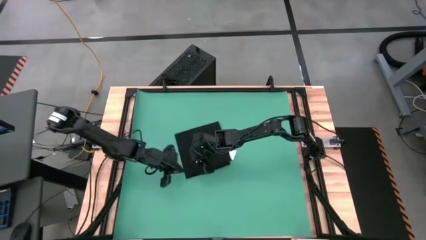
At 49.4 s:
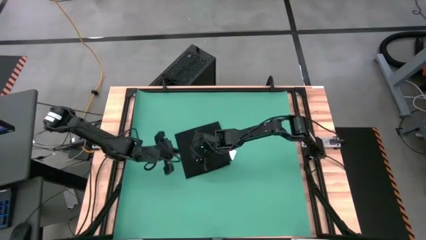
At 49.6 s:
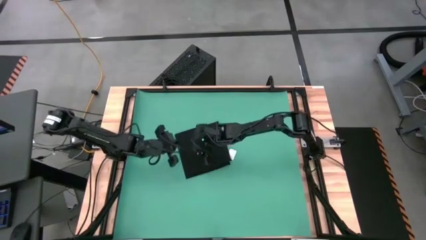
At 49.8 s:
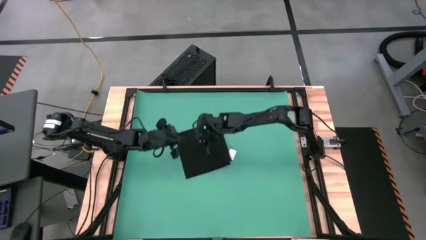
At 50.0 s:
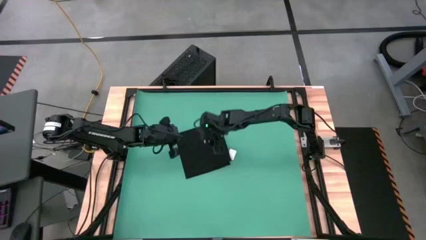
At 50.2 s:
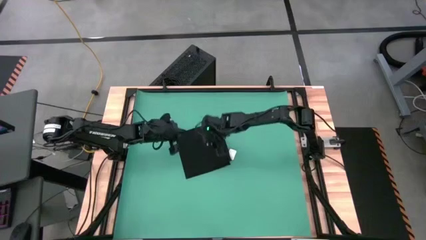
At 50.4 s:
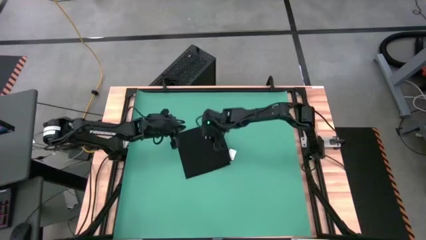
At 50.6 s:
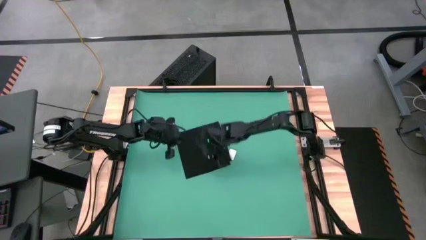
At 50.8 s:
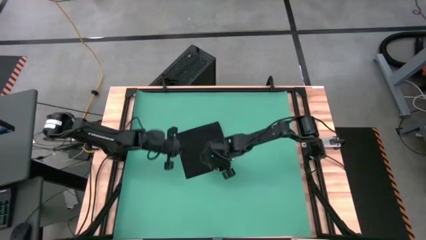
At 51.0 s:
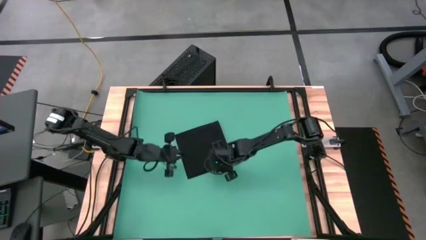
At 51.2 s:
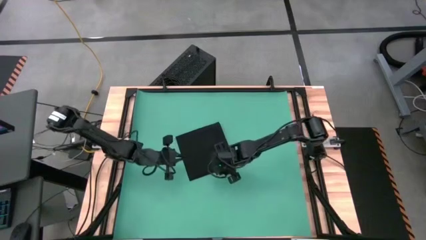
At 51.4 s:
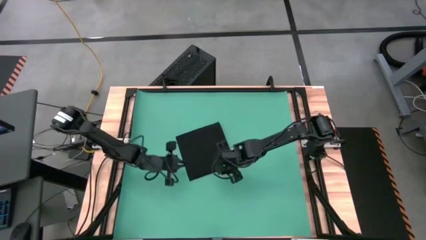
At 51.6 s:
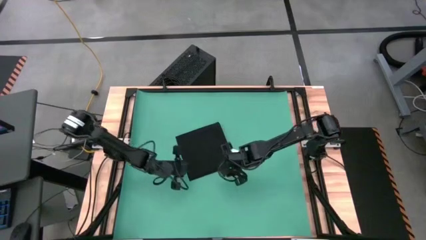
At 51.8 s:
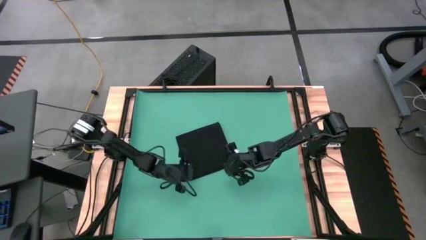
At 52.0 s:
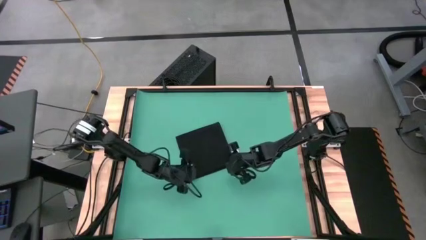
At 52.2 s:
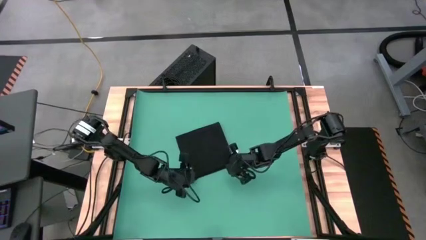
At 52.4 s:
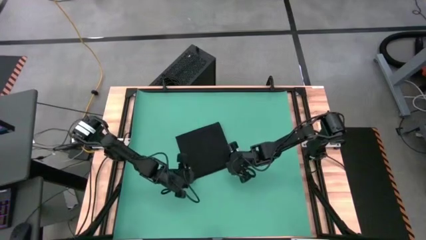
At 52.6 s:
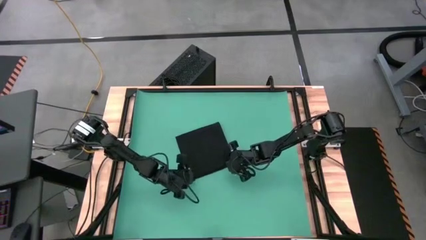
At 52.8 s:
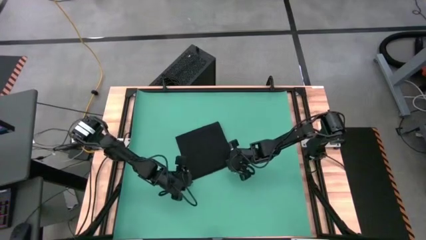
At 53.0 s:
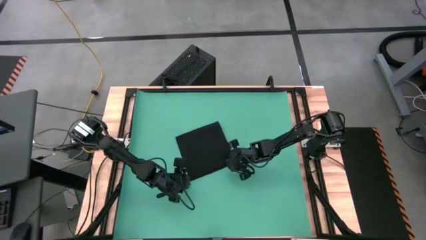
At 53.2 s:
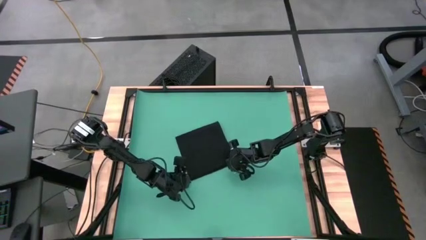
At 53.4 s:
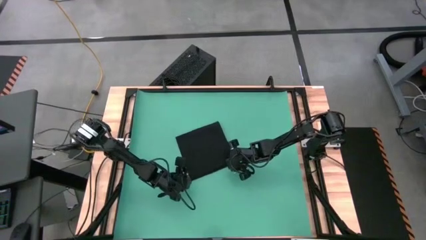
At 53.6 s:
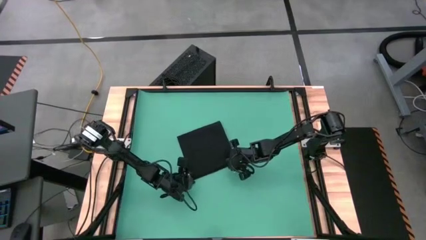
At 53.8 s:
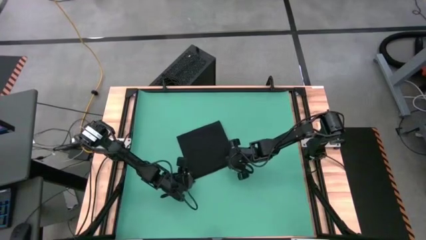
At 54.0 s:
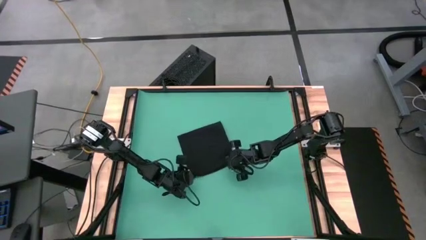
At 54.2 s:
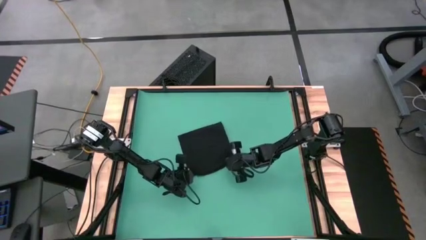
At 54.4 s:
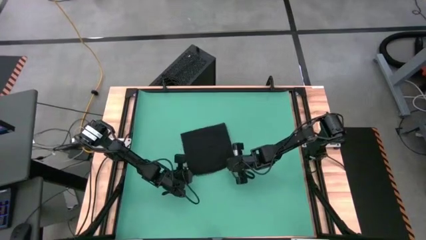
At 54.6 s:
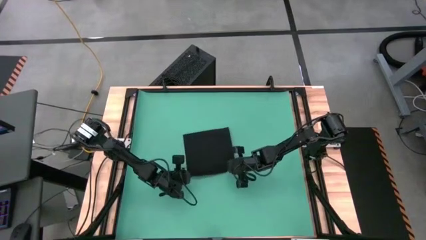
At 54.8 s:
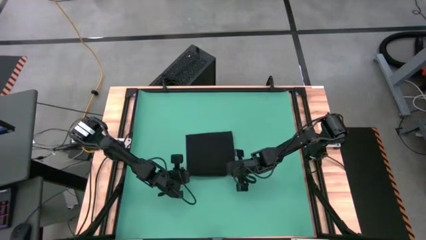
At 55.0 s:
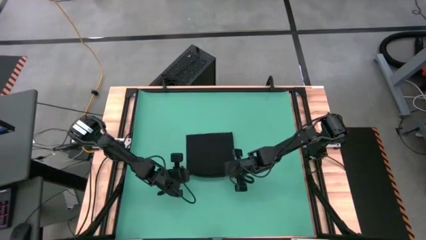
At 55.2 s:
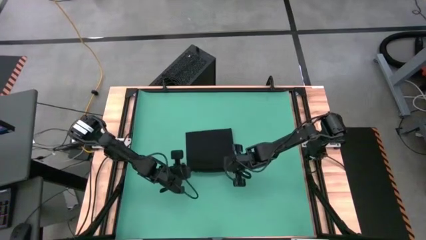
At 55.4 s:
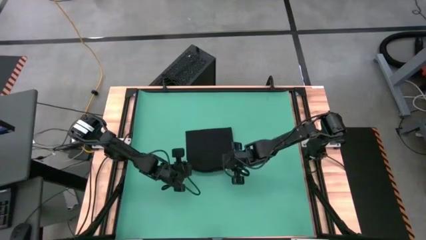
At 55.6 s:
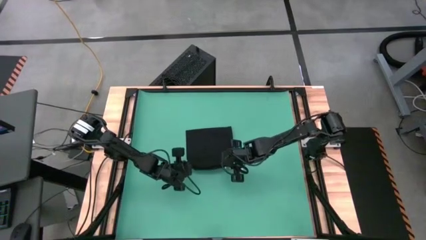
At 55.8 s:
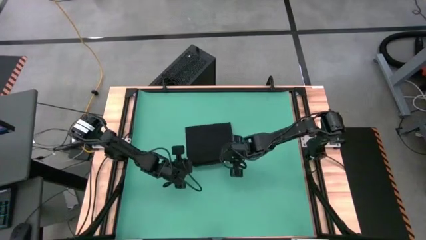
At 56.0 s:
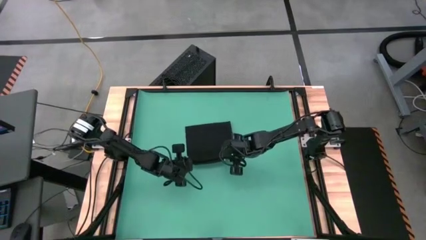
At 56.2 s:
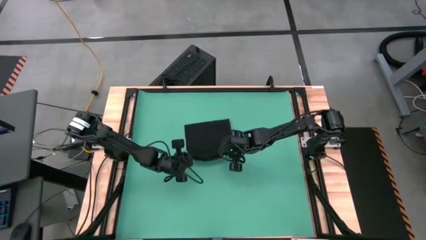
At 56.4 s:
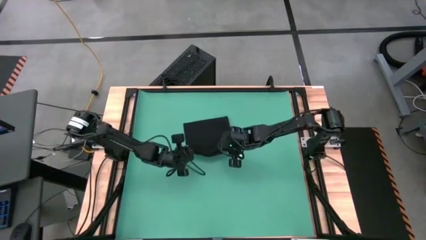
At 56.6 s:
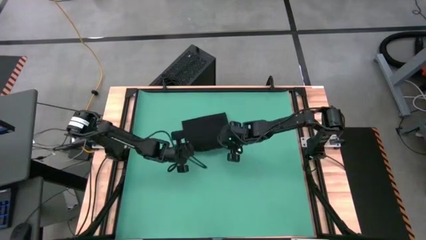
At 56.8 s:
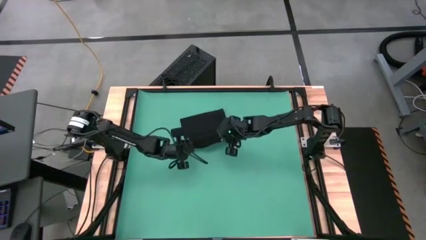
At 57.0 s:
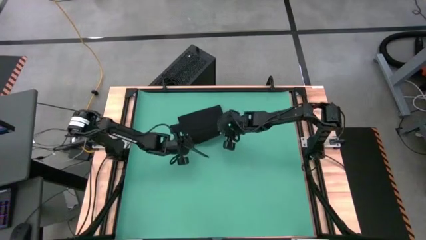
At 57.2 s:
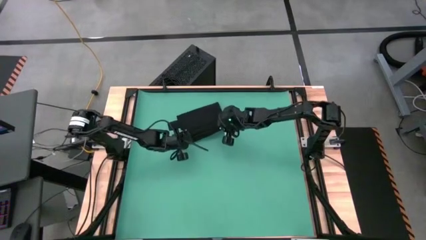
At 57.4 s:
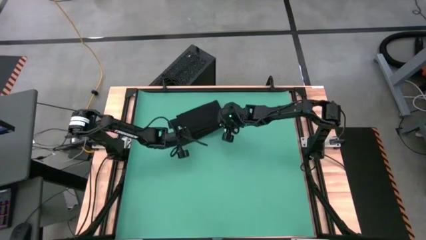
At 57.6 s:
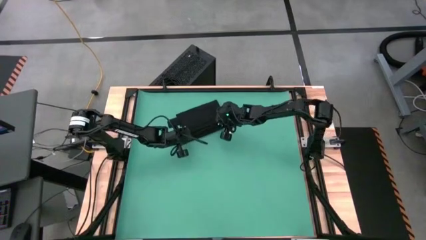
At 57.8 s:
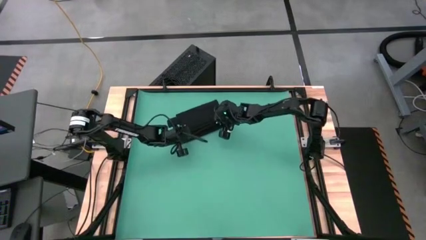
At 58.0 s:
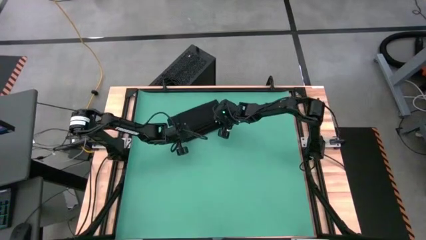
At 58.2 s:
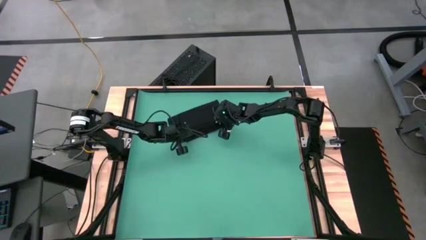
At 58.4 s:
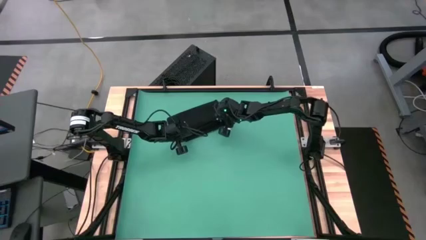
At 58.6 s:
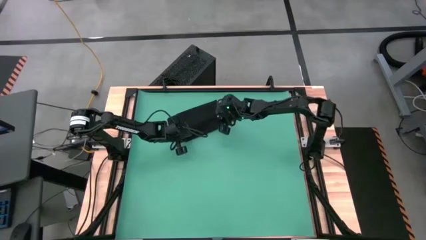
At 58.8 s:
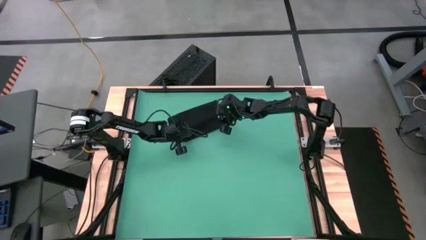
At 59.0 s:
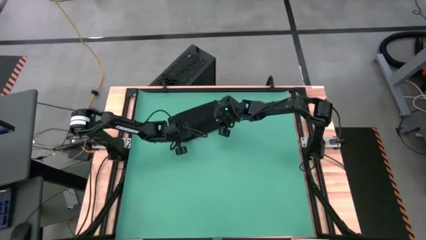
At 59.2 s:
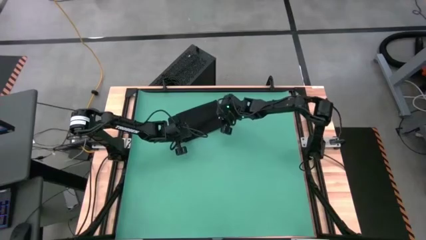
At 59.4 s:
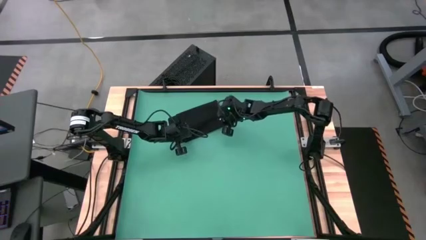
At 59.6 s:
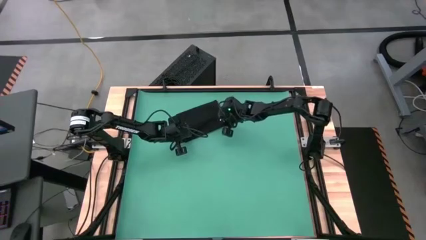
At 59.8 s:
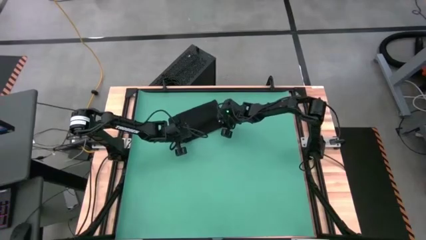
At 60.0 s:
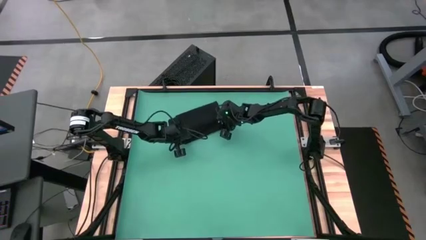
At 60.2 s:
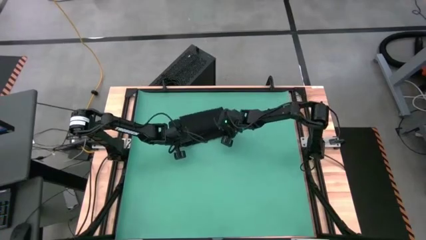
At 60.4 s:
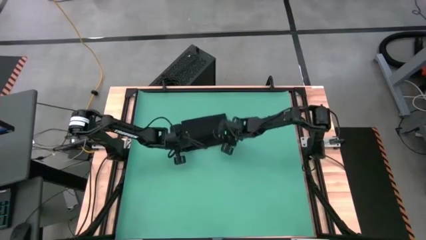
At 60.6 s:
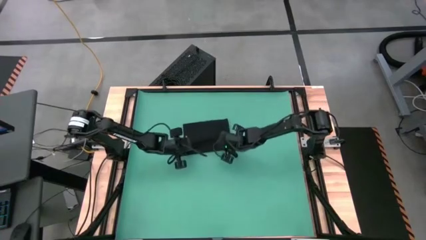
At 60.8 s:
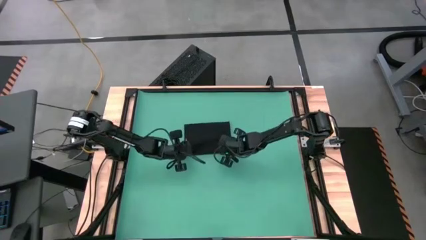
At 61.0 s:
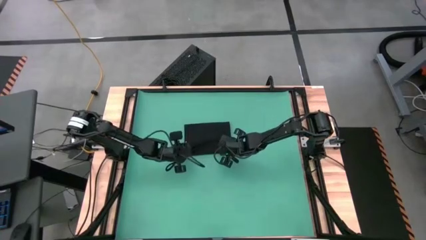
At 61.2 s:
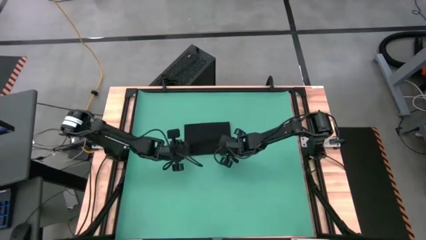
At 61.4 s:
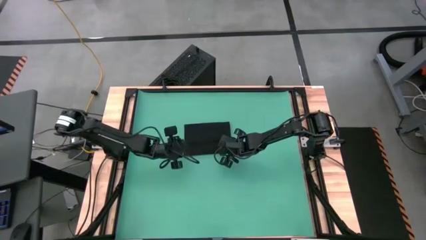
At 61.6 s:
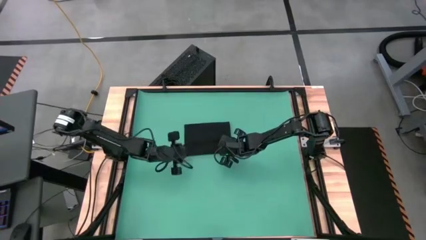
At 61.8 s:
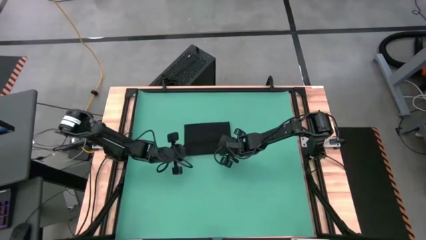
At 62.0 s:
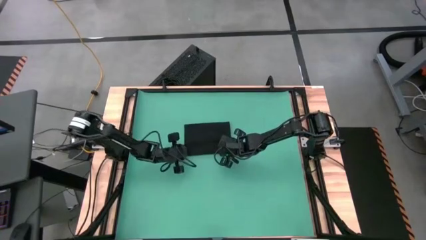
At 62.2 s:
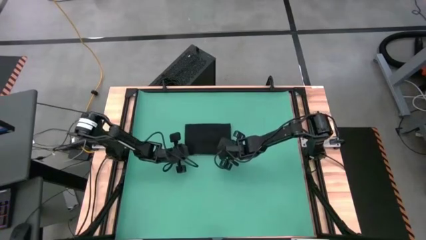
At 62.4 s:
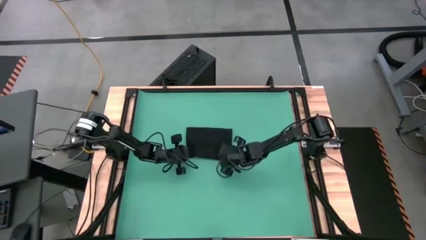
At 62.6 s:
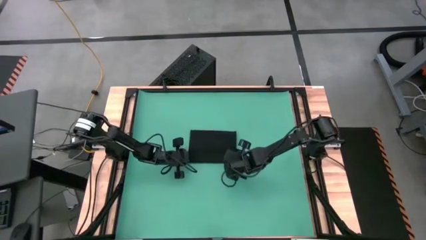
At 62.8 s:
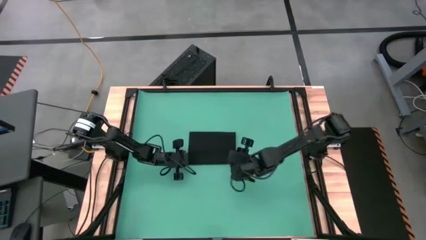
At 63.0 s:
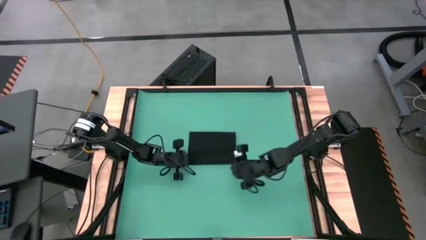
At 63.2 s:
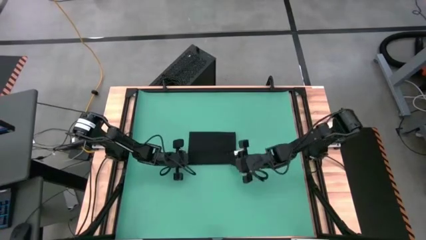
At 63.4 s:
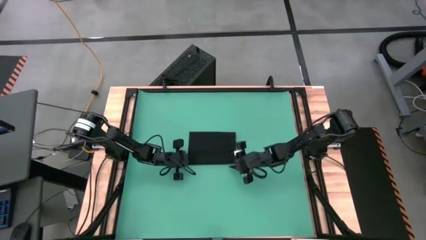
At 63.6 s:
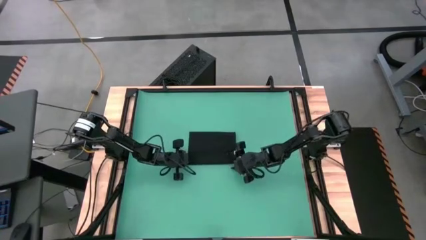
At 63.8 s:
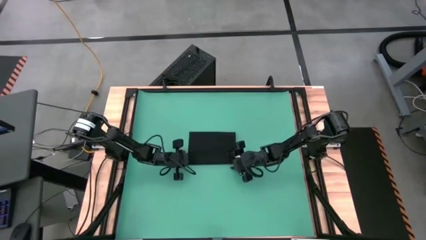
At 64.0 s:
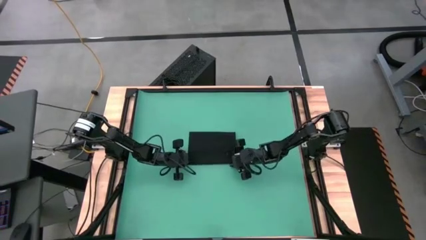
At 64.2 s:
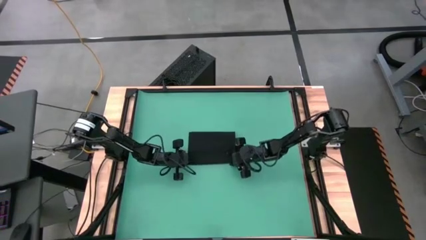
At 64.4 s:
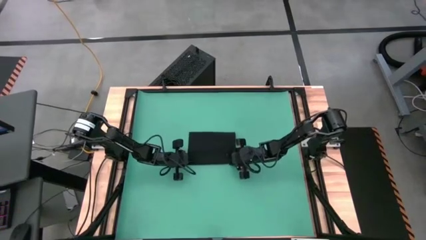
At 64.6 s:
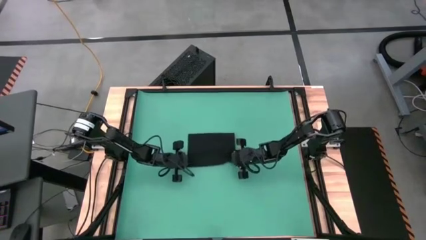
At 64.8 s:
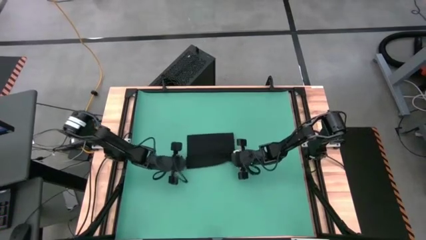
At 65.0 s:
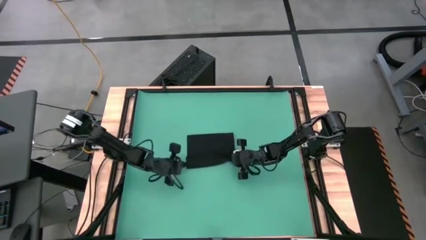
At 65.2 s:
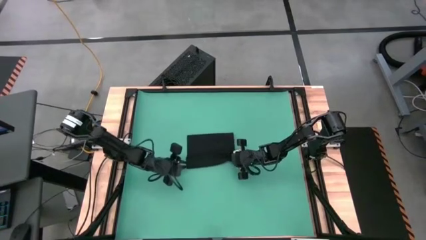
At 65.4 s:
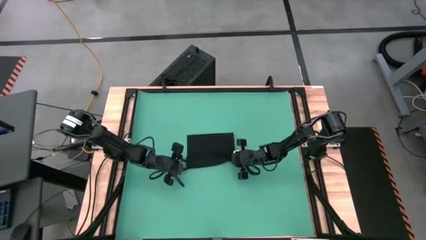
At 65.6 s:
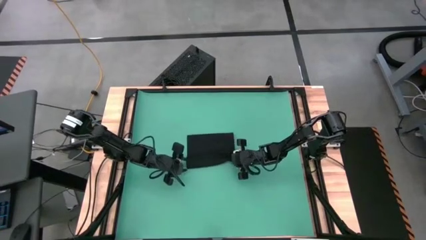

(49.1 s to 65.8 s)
Task: Roll towel
Roll the brown towel
